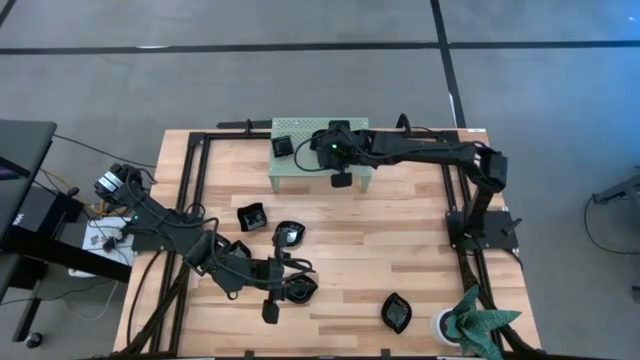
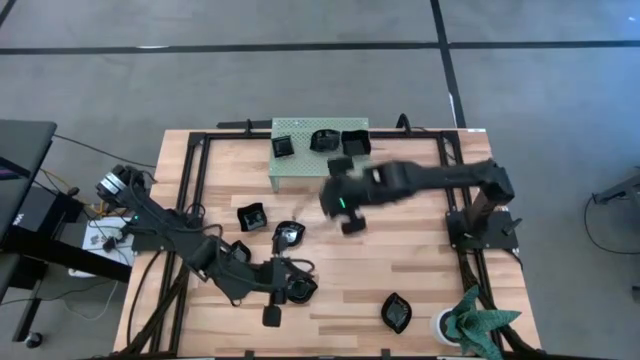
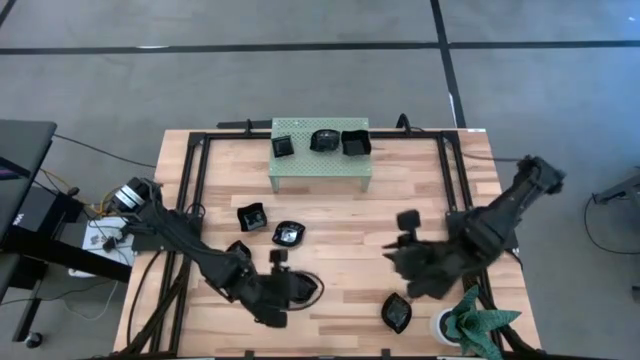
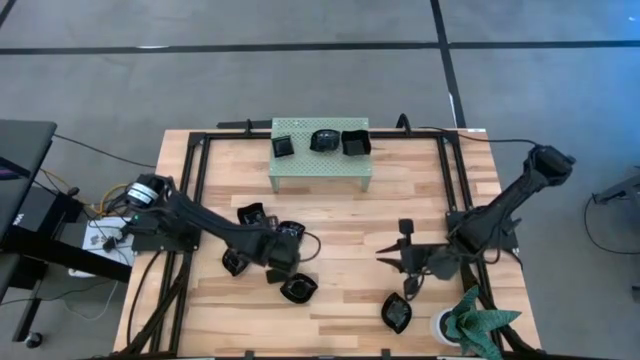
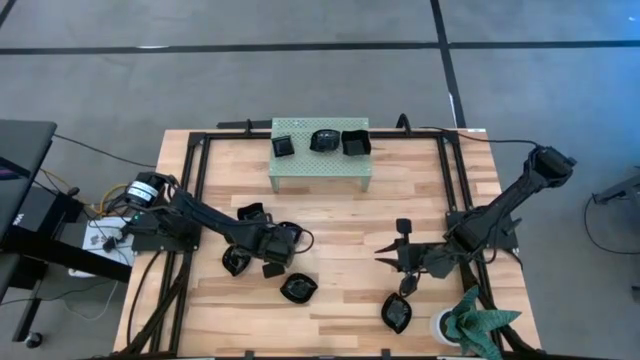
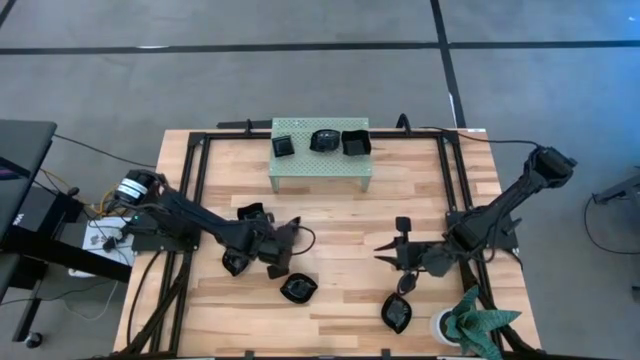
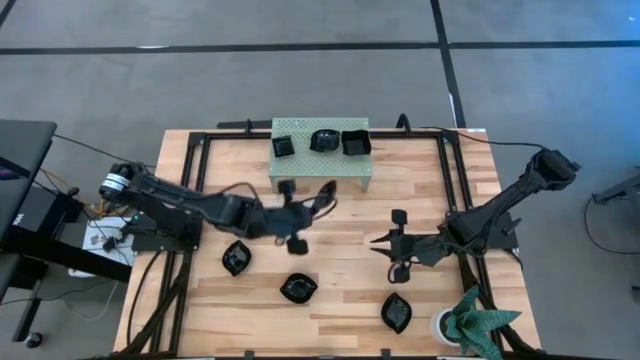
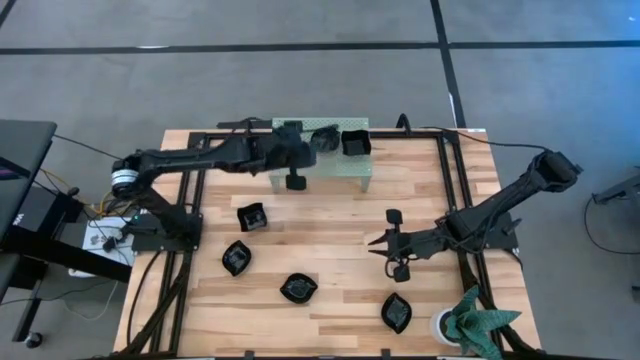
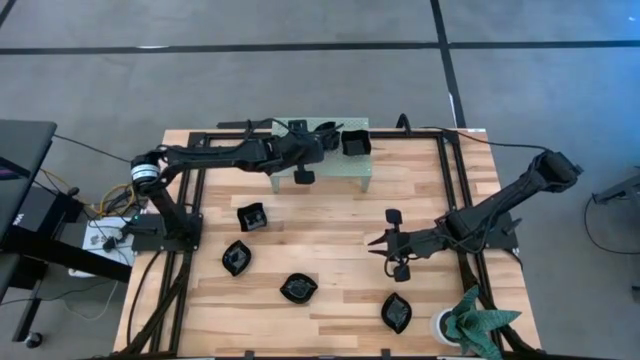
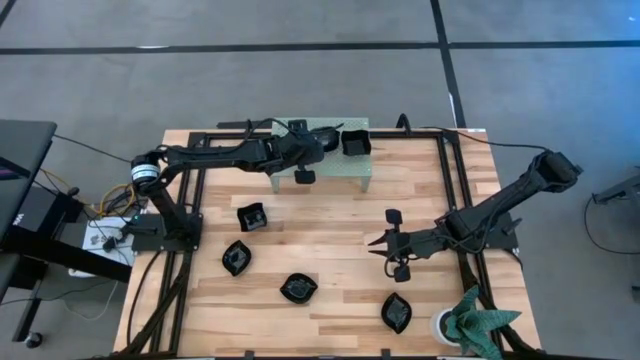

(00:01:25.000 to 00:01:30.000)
Task: Pick & Place Mini shaped plates
Stack the black leaf shape plate on top of the black leaf shape plate on the shelf

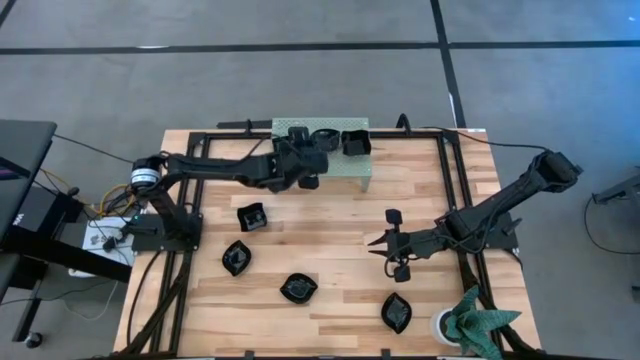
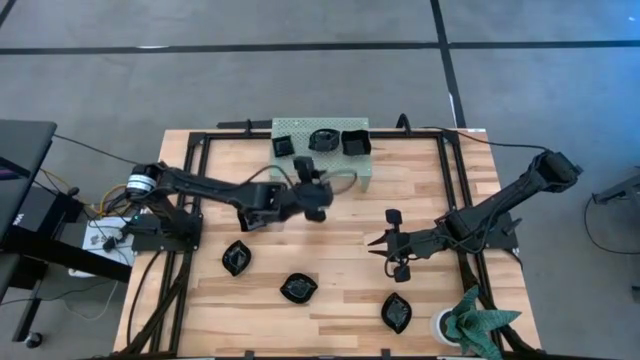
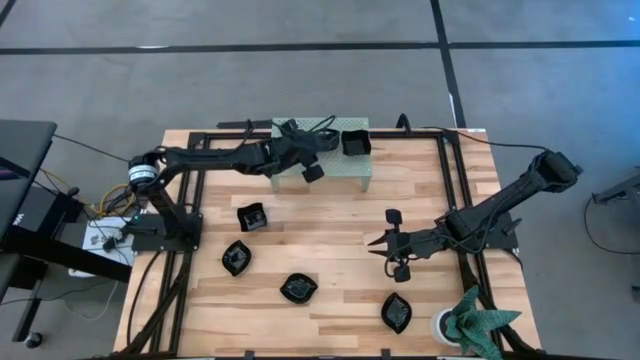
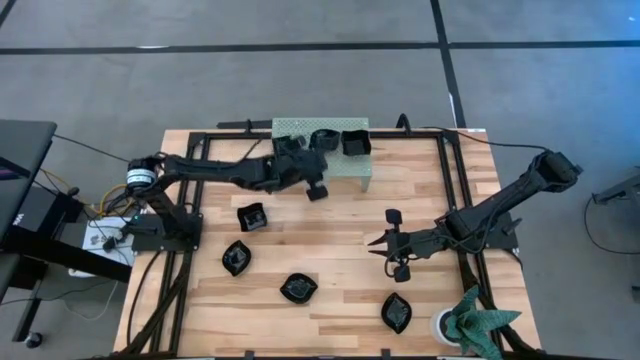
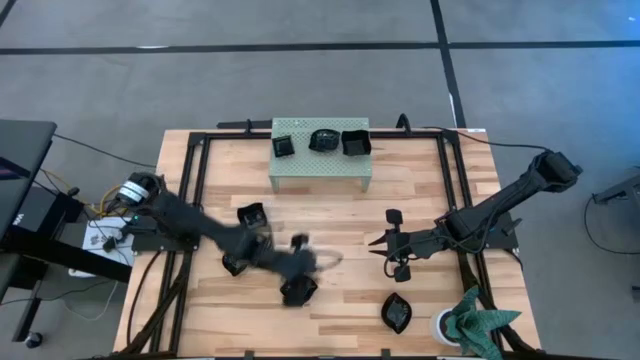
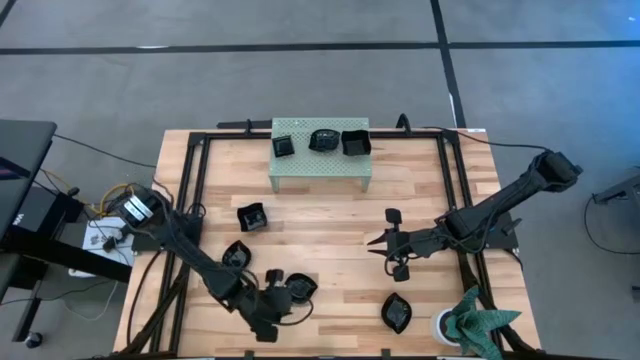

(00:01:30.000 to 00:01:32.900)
Stack the black leaf shape plate on top of the black leaf shape plate on the shelf

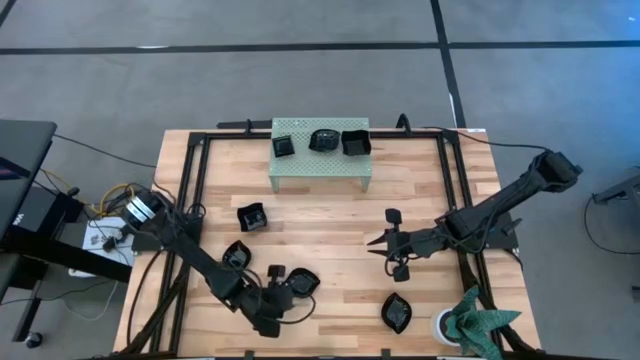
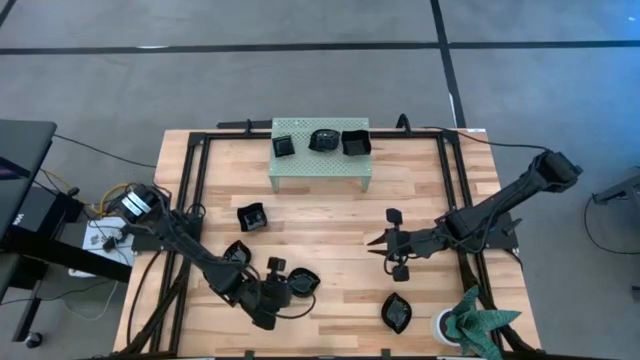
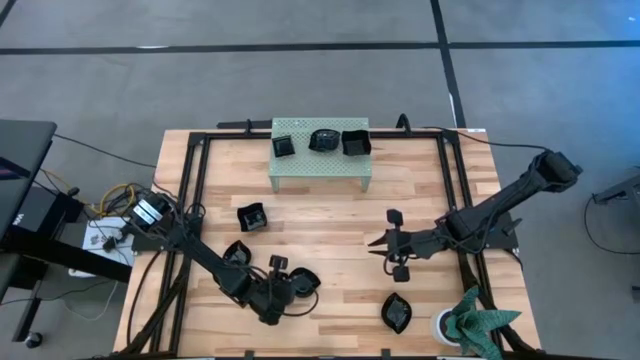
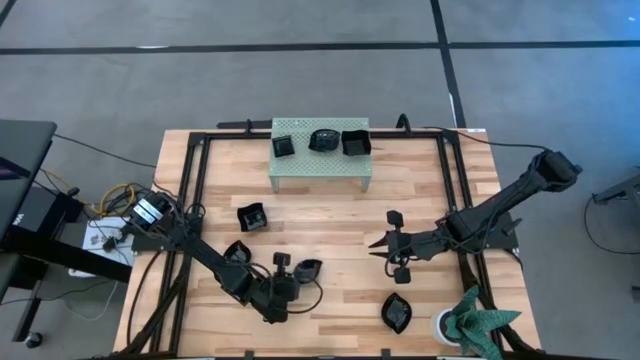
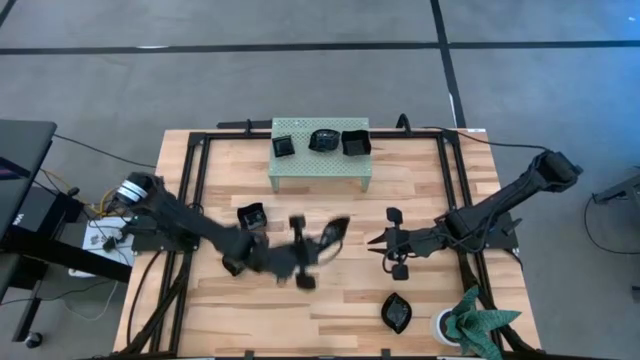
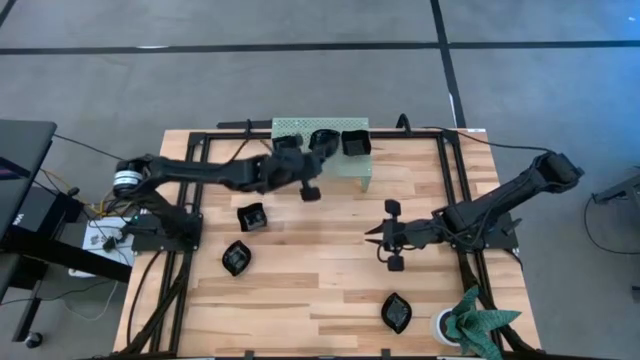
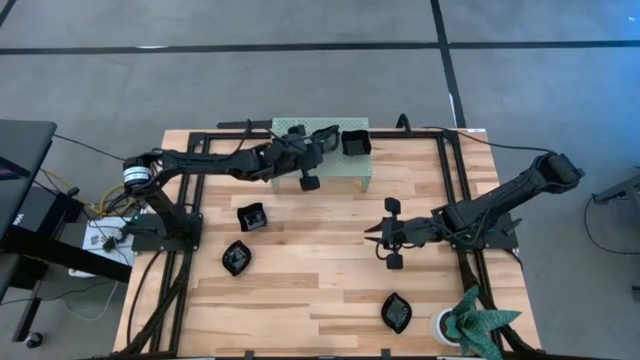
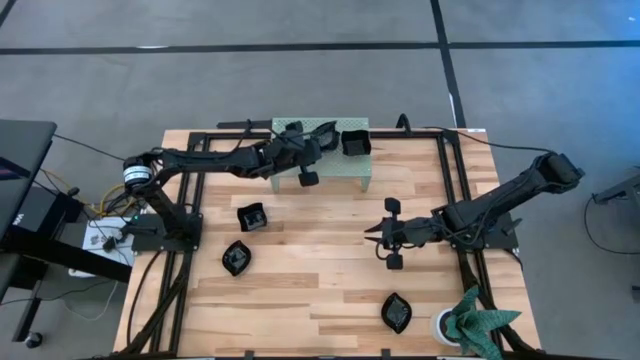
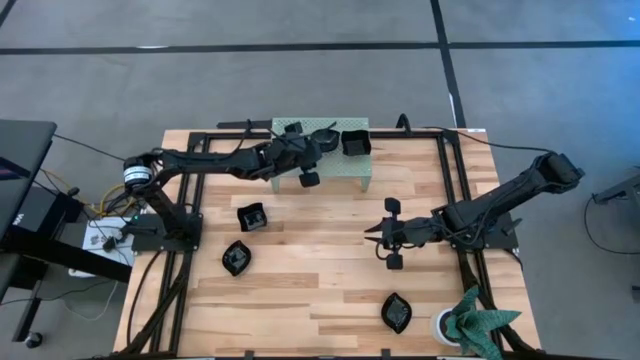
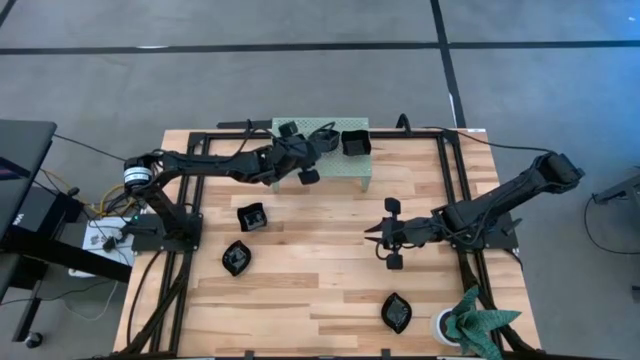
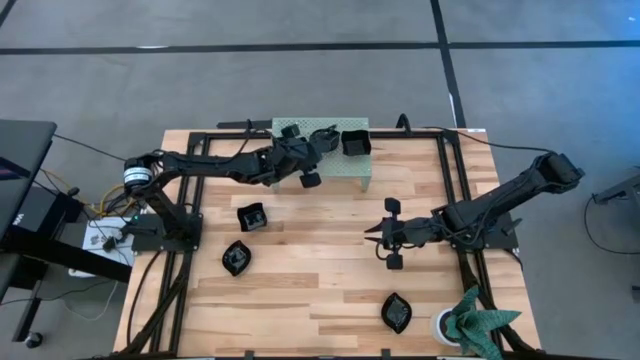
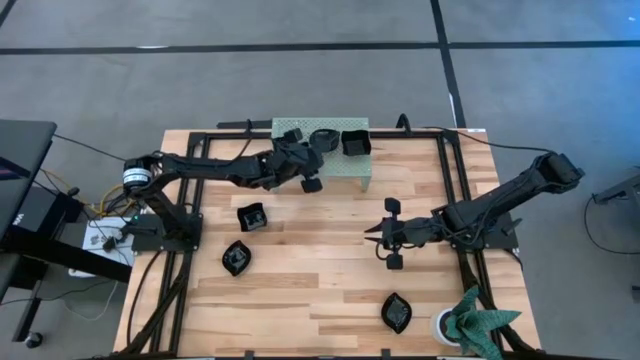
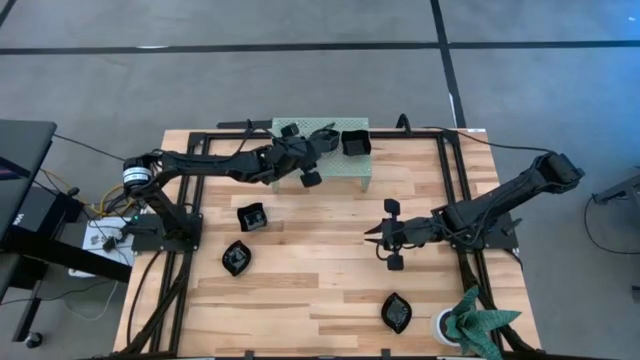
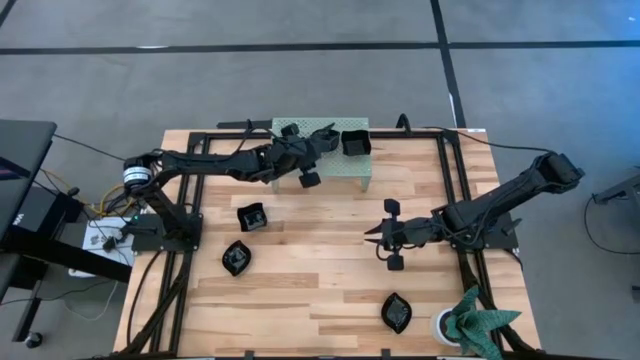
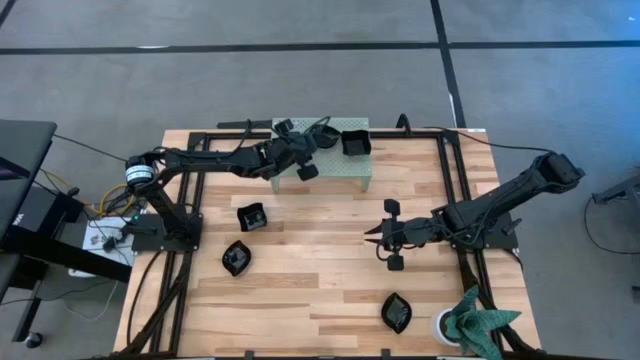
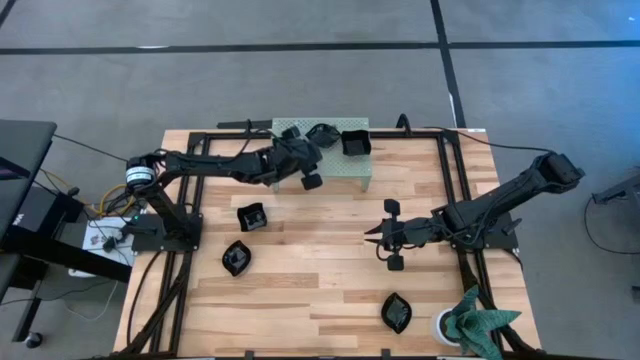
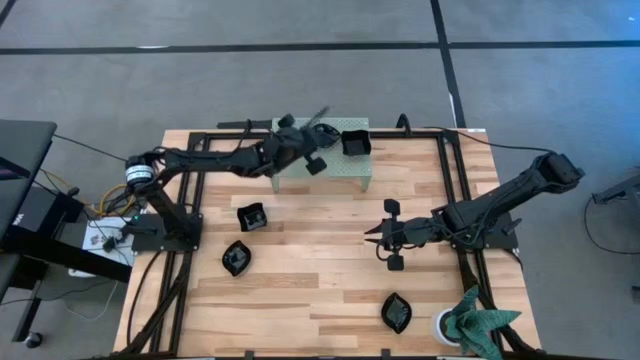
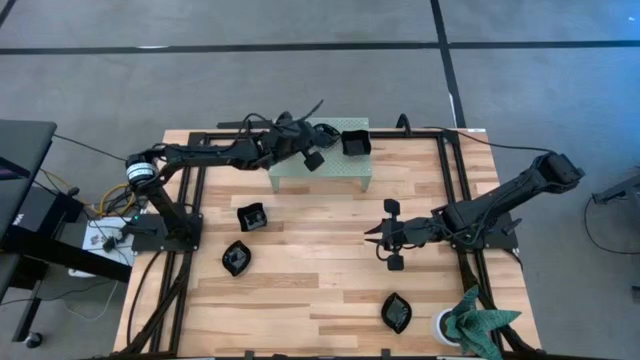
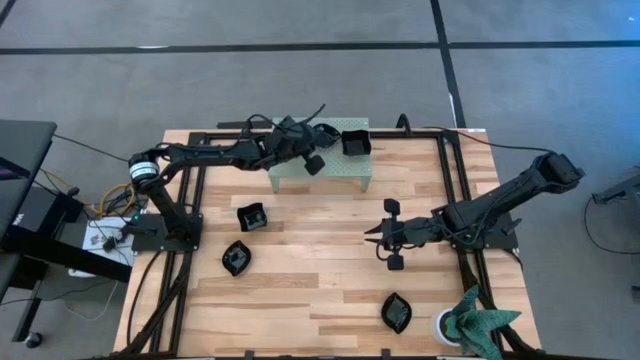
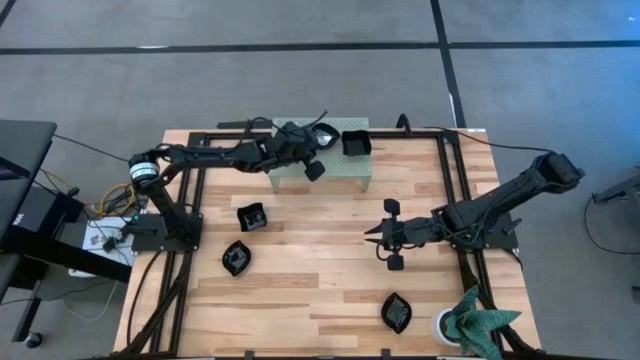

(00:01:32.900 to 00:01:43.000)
Stack the black leaf shape plate on top of the black leaf shape plate on the shelf

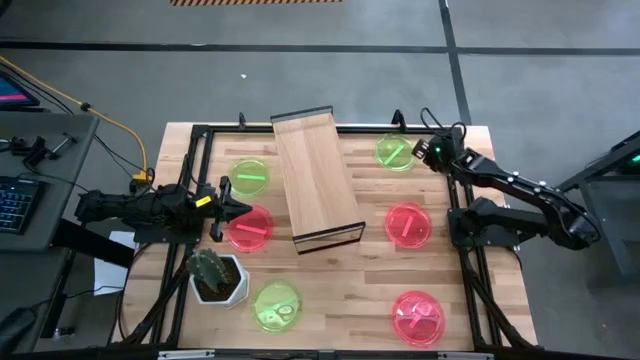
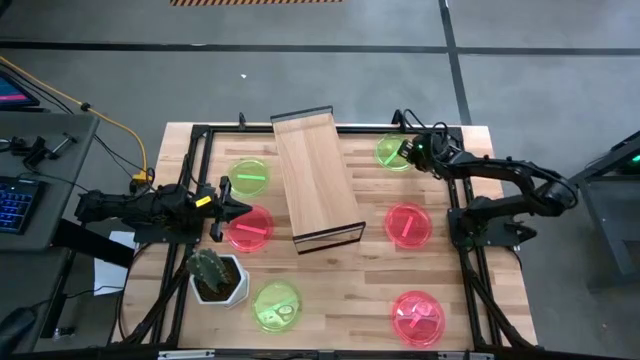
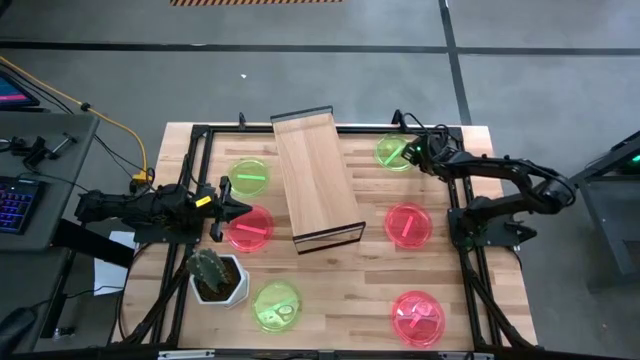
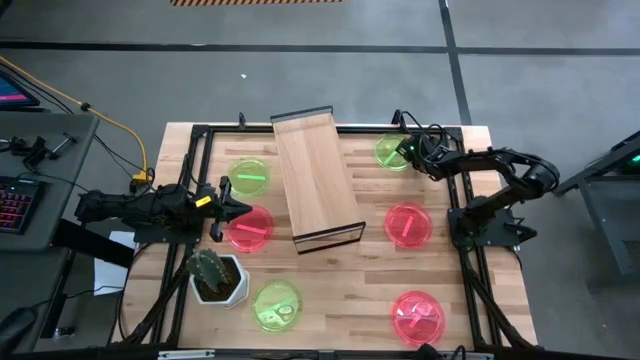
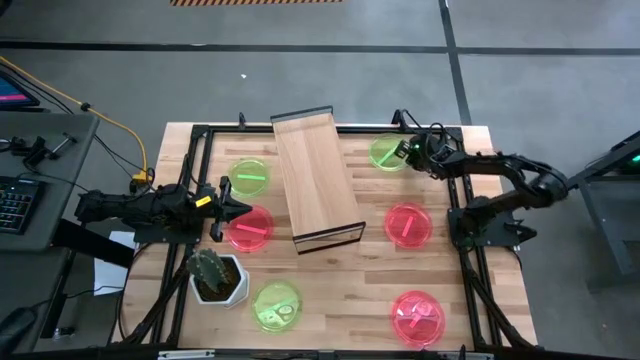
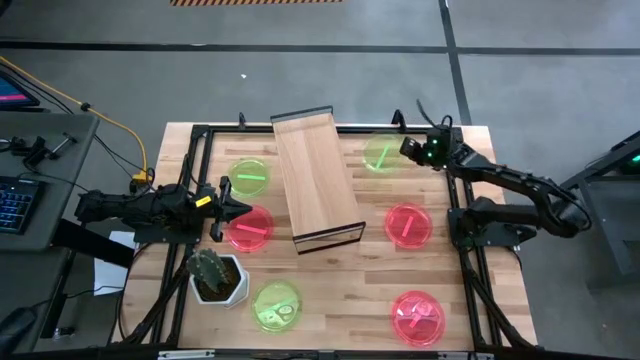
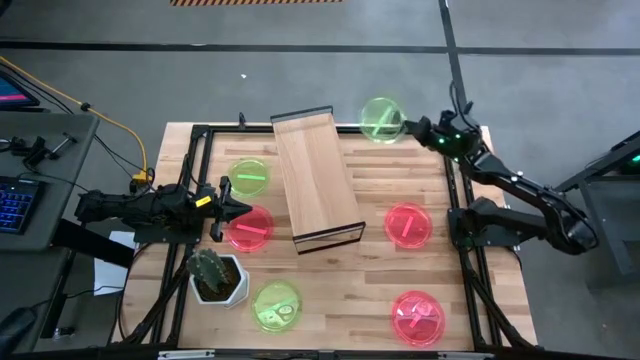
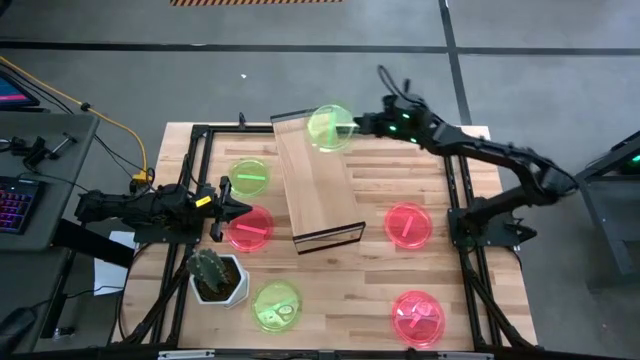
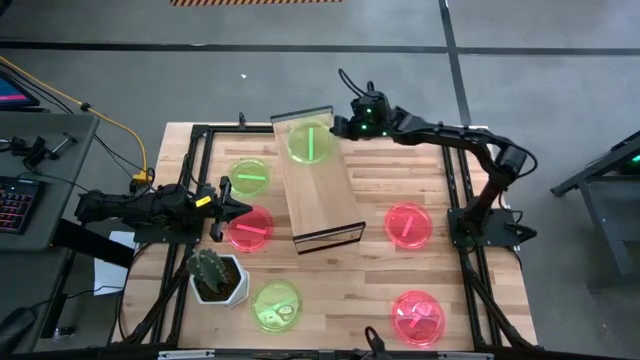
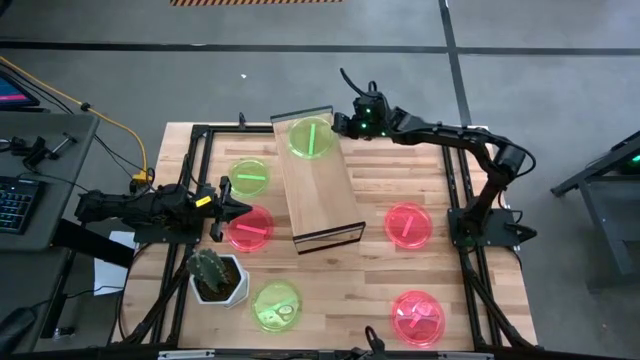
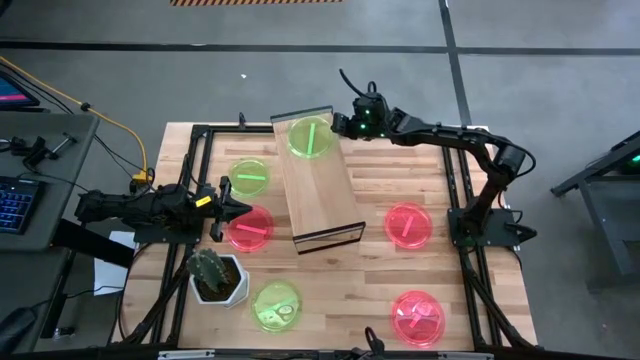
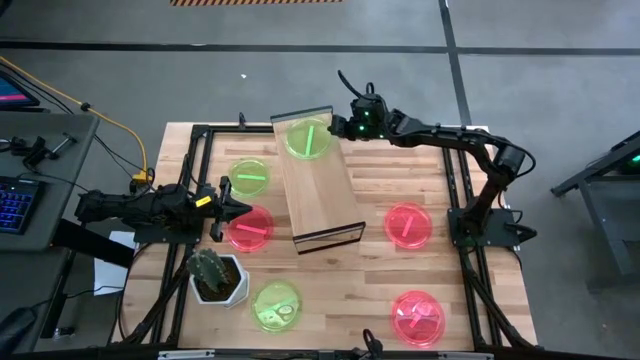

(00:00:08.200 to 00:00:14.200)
Task: Place and stack plates onto a shelf
Put the top right green plate on the shelf
